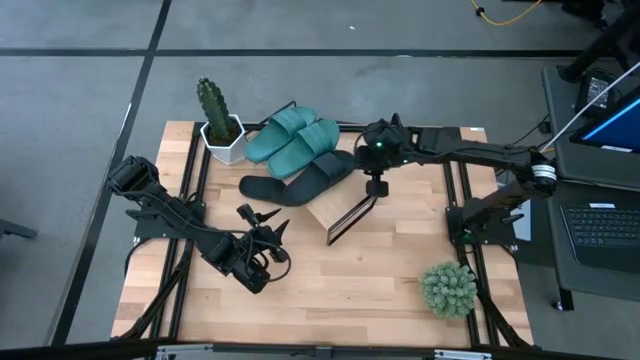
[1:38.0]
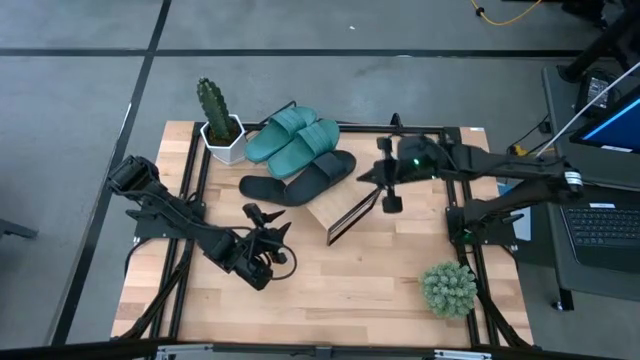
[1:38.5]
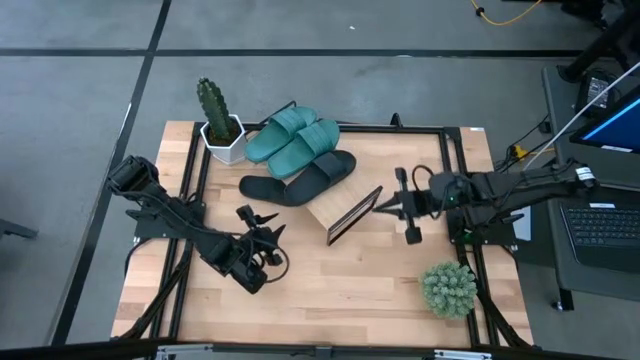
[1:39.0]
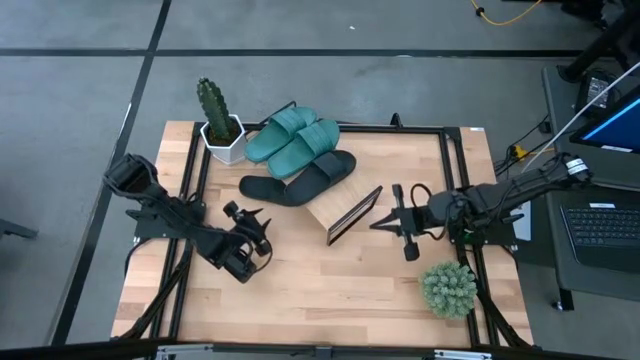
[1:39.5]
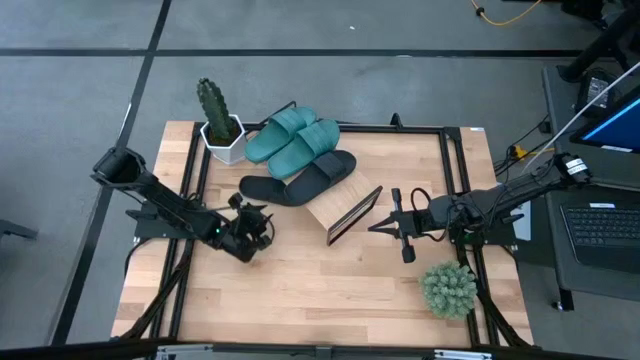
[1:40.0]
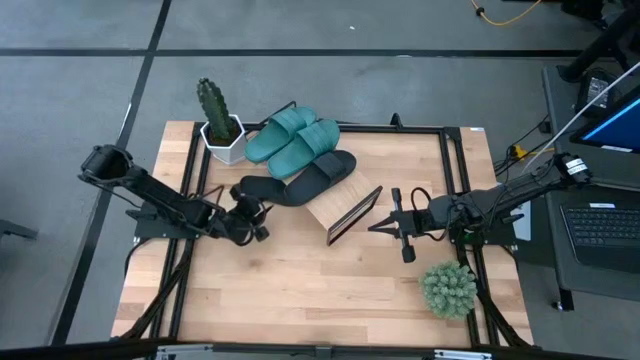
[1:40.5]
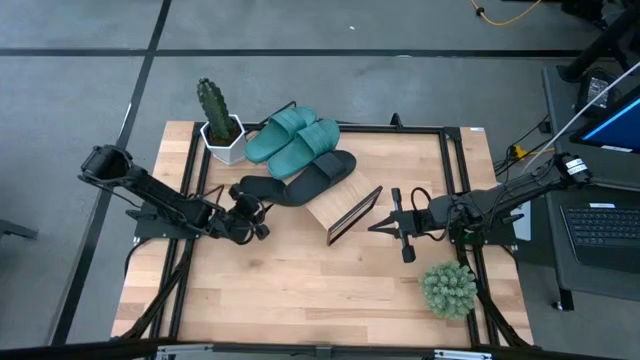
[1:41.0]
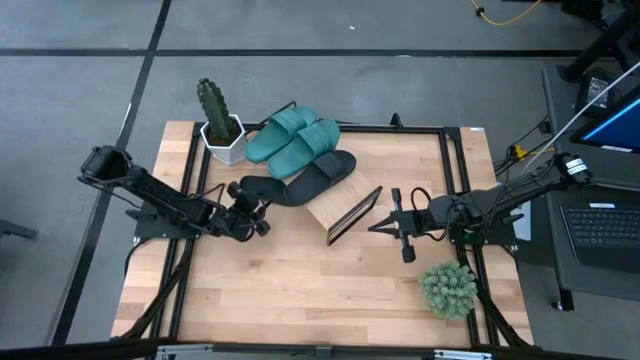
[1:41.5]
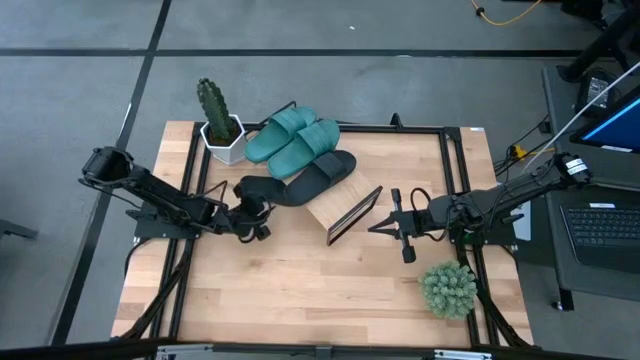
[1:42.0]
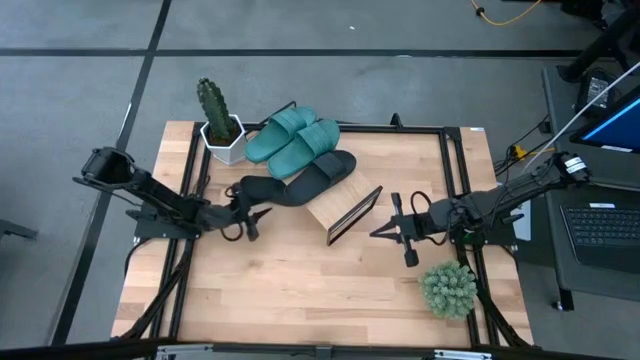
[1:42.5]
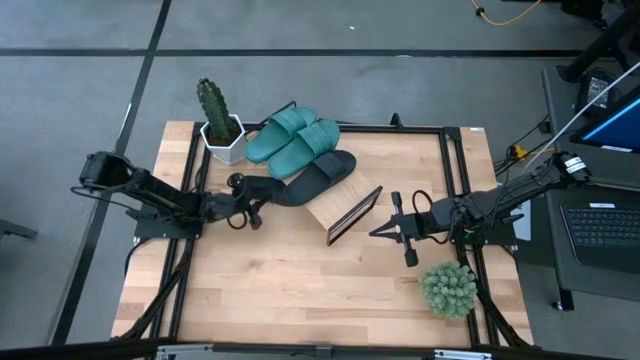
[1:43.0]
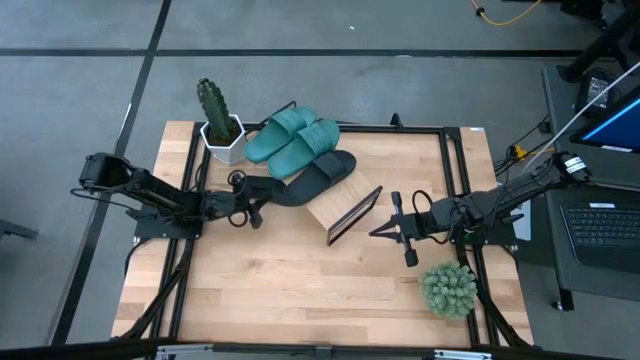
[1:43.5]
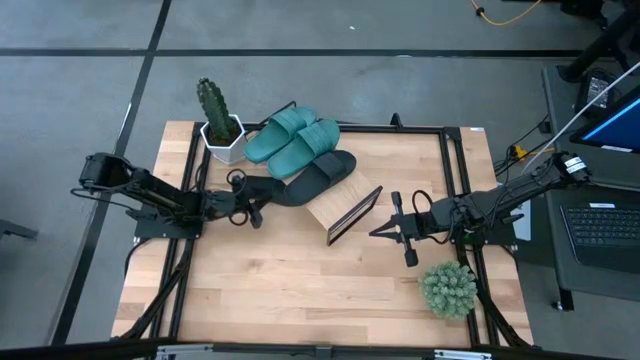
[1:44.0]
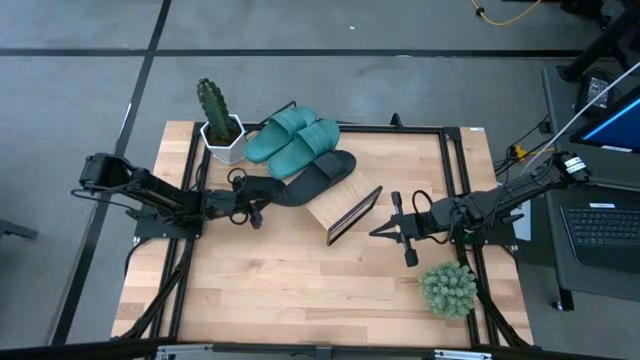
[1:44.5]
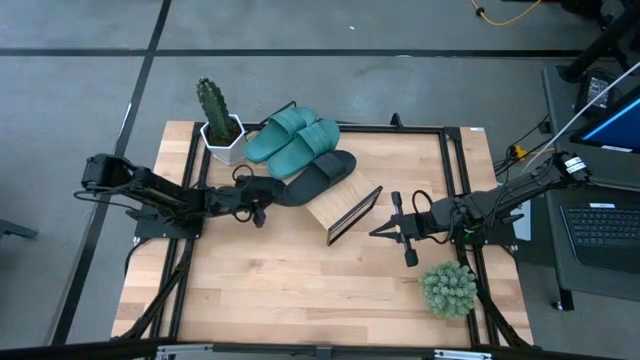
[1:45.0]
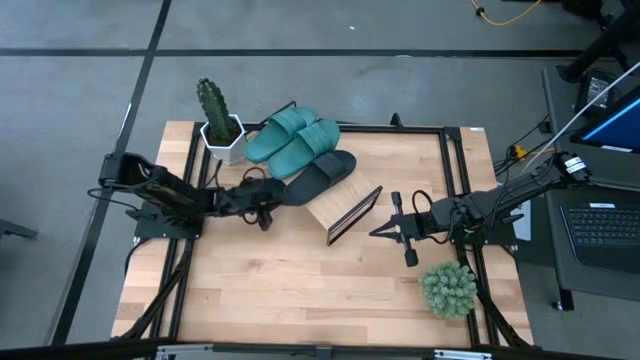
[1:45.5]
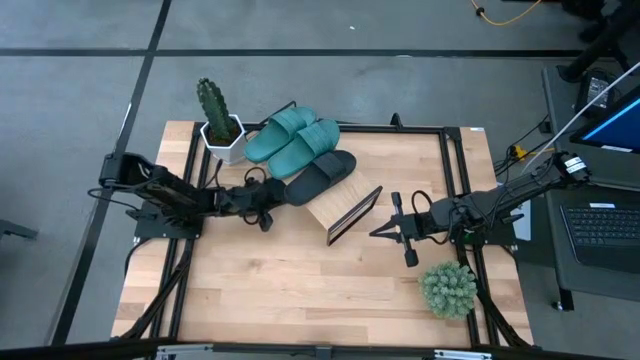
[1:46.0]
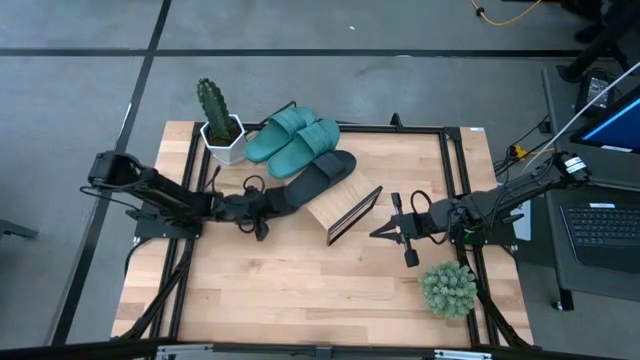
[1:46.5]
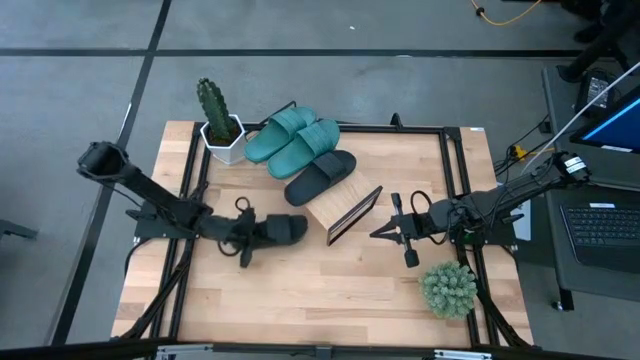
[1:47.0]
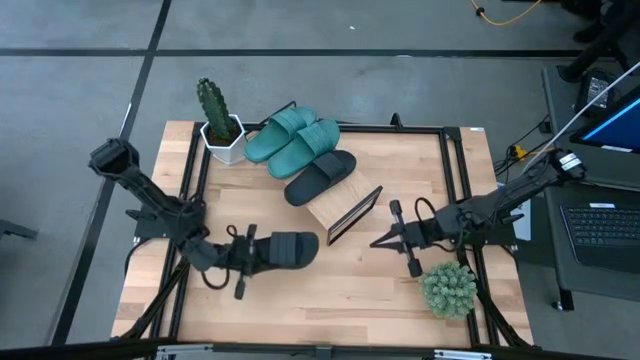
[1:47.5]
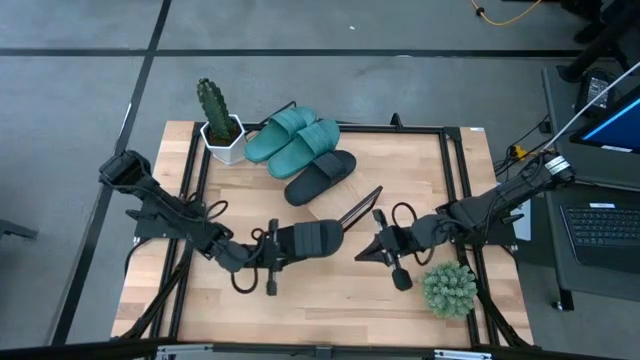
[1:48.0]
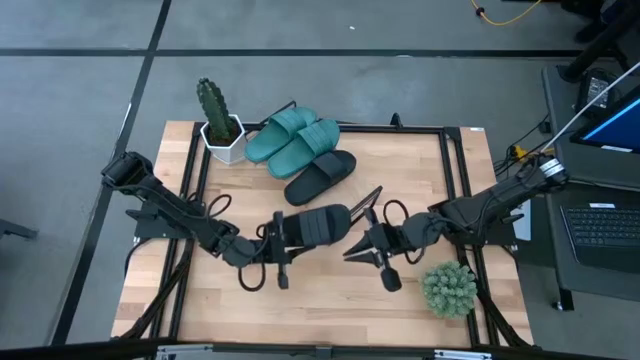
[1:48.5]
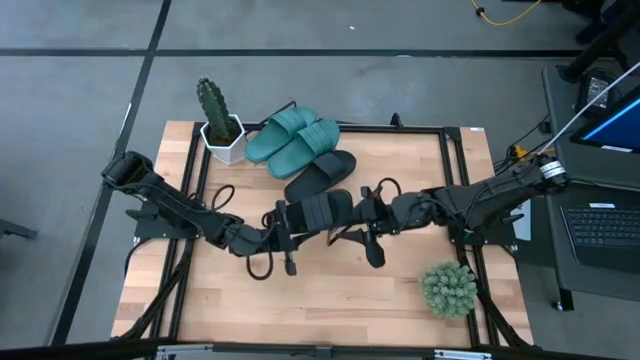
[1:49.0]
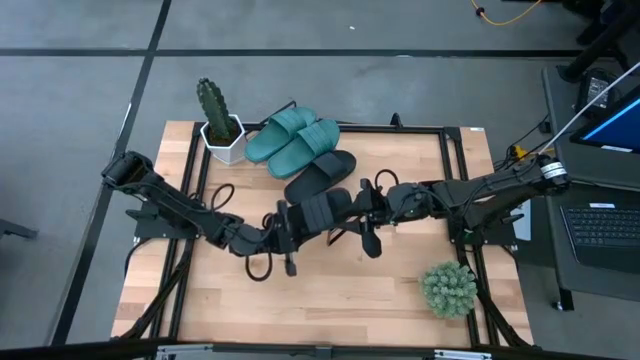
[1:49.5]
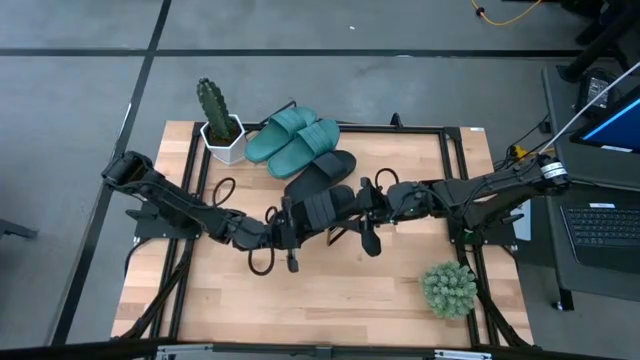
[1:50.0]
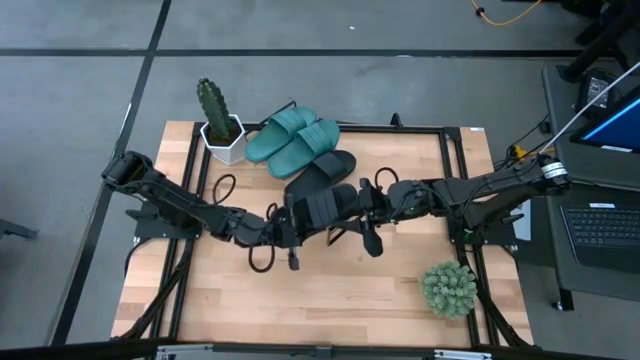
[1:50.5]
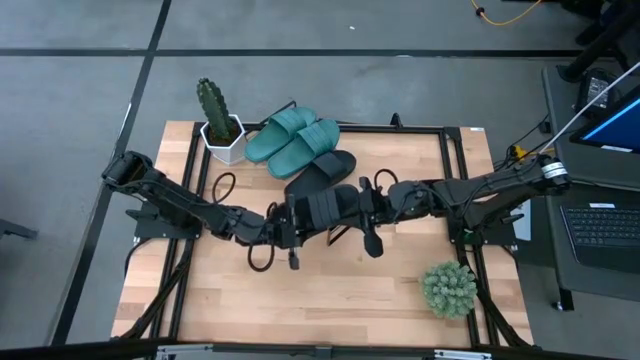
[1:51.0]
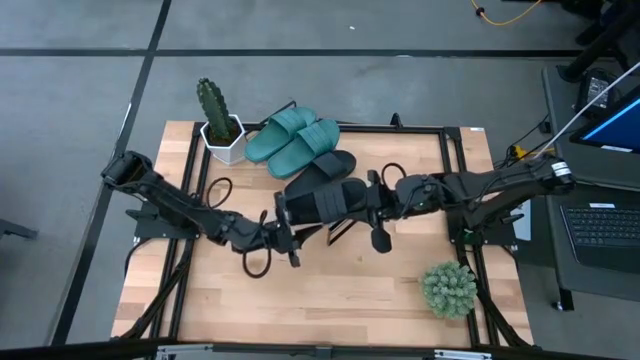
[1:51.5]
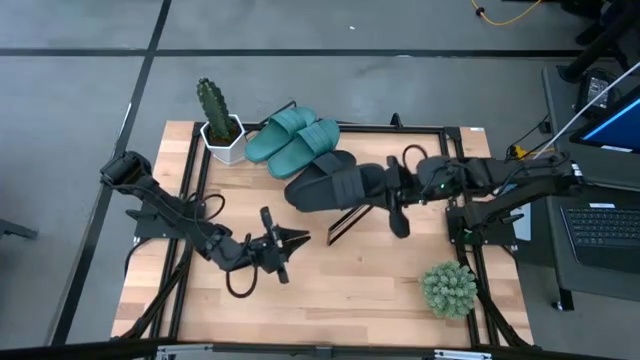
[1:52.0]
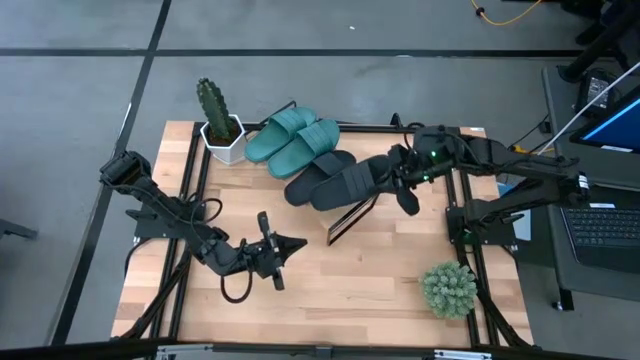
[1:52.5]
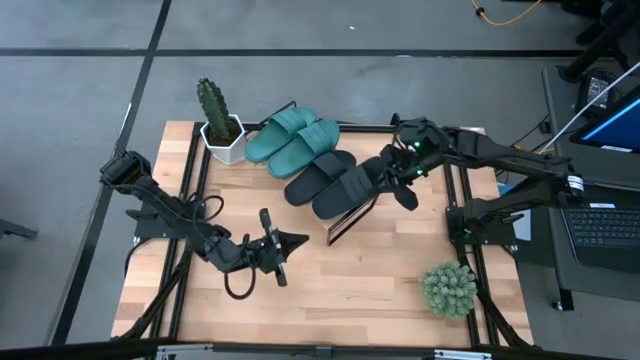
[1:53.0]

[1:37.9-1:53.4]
Task: Pick and place slides into the shelf
Put the black slipper onto the shelf

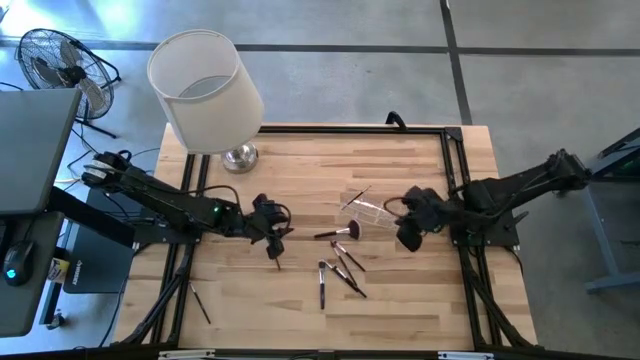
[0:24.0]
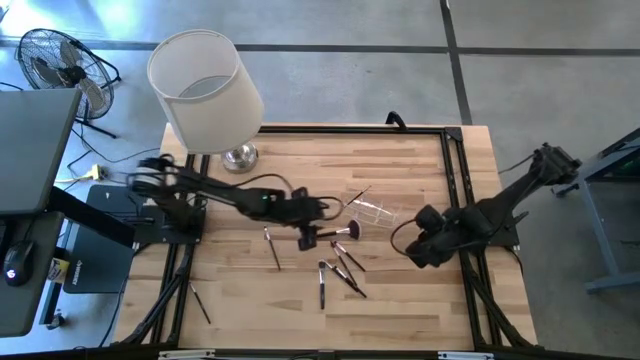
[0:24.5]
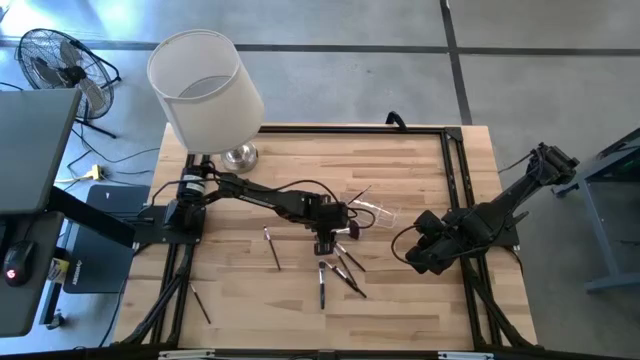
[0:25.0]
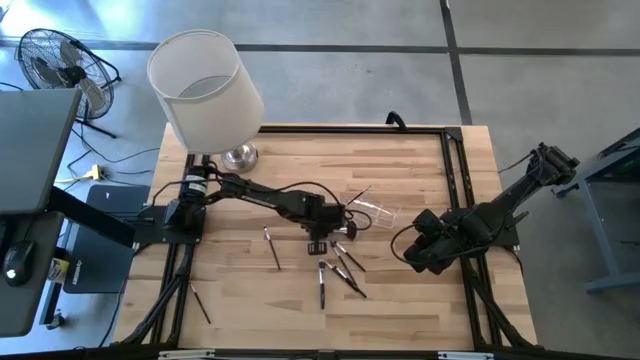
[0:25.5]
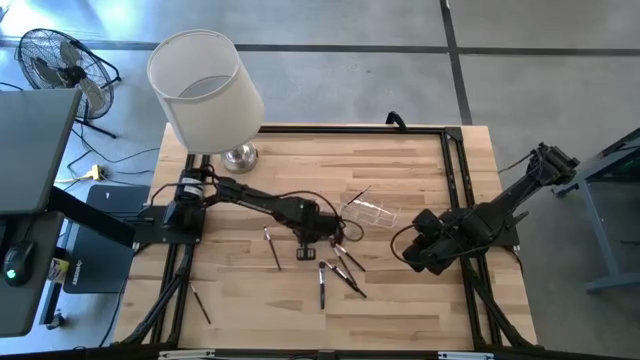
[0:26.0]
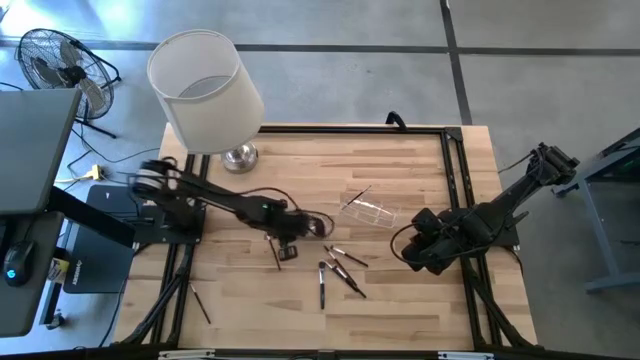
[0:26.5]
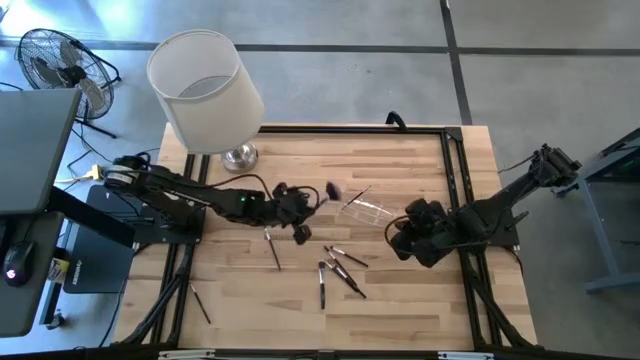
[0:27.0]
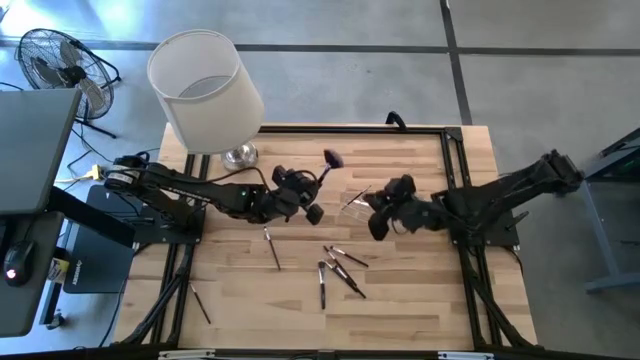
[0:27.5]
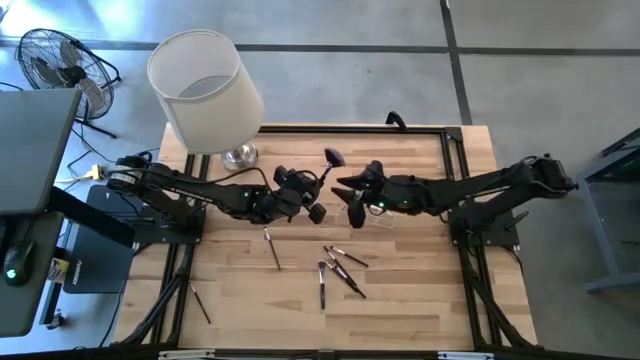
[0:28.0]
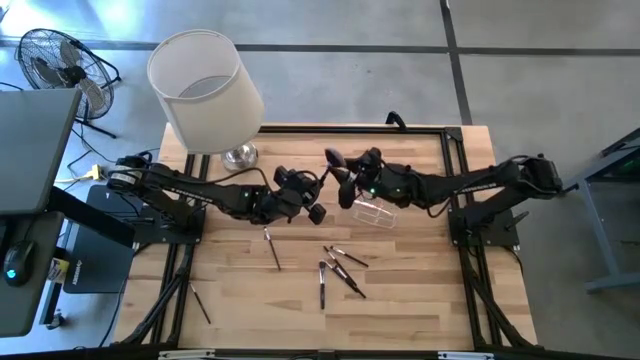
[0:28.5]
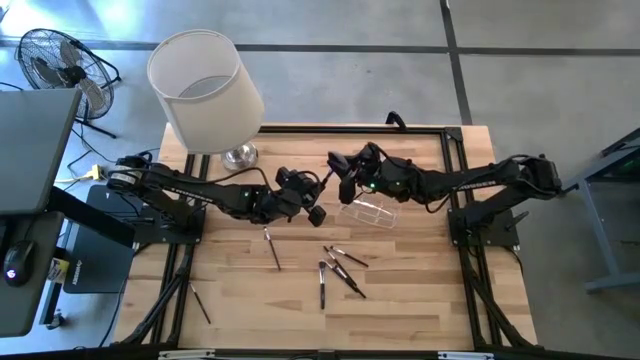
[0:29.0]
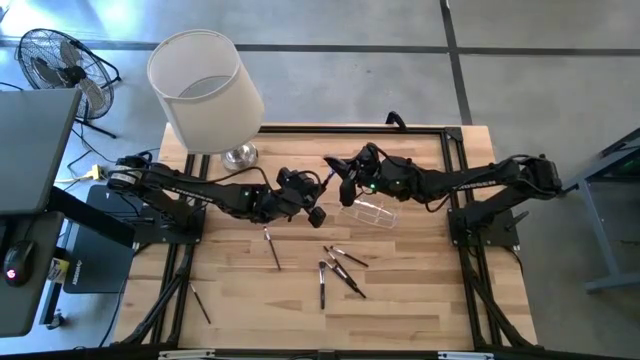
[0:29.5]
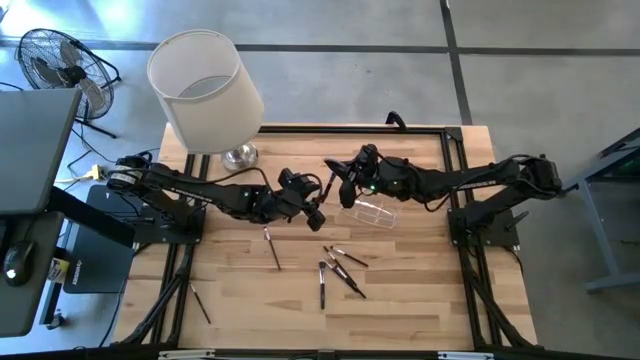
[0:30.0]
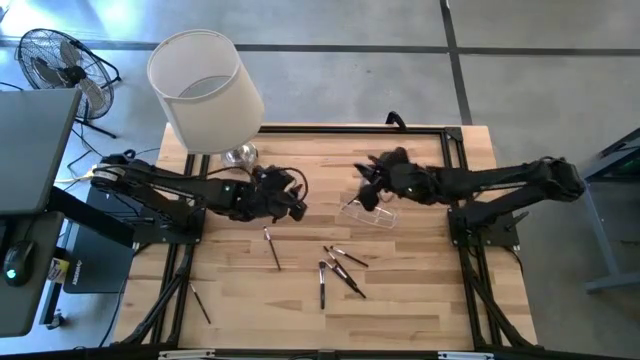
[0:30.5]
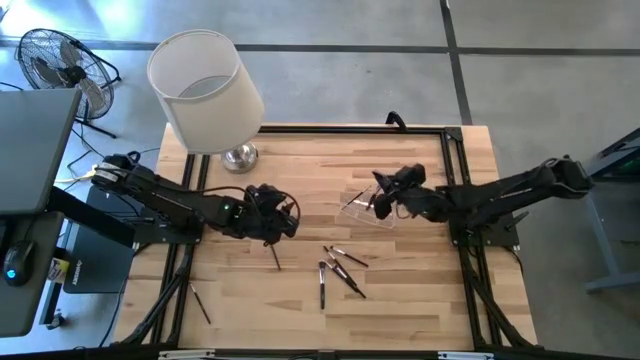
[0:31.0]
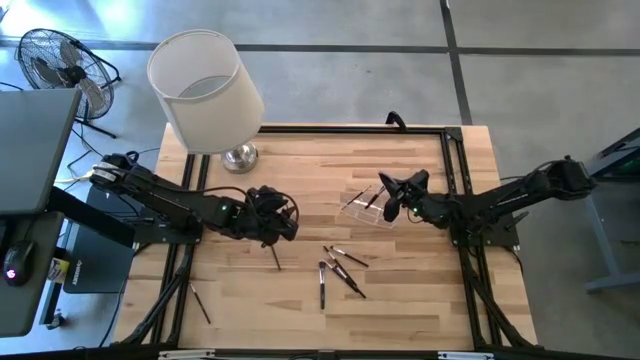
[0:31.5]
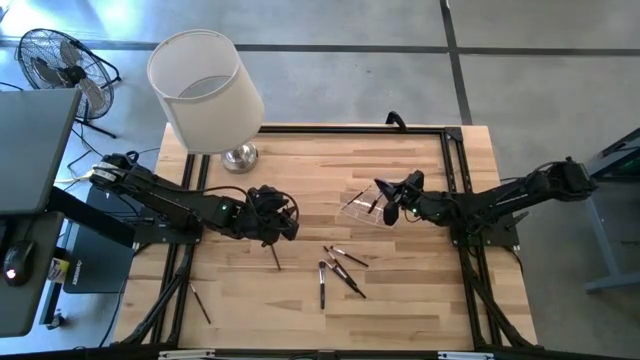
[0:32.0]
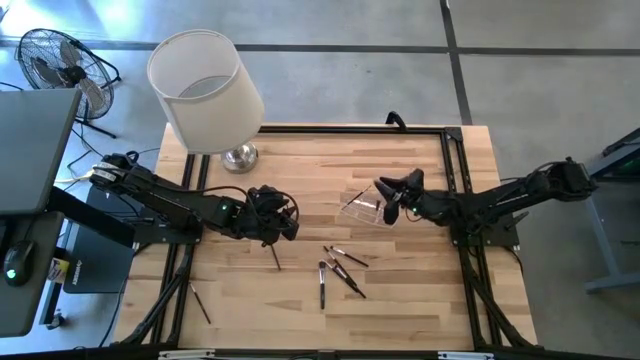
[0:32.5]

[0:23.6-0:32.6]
Task: Put items in baskets/containers
Put the black highlighter brush into the transparent organizer
